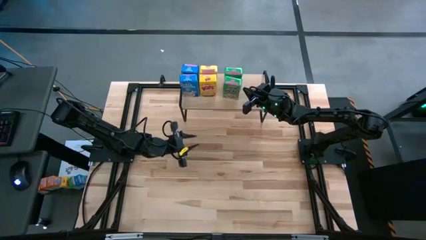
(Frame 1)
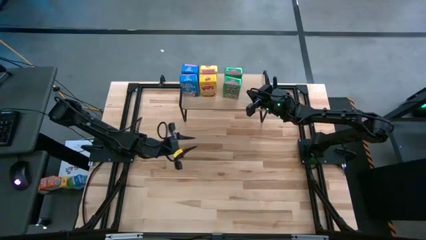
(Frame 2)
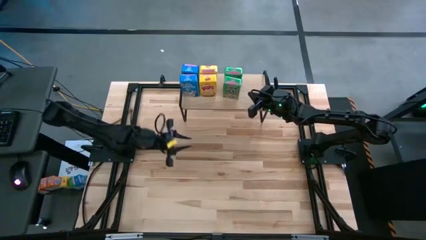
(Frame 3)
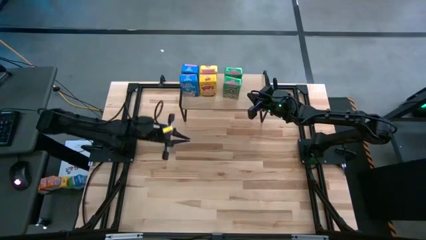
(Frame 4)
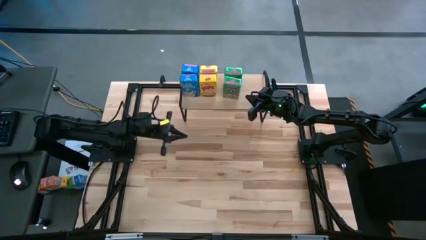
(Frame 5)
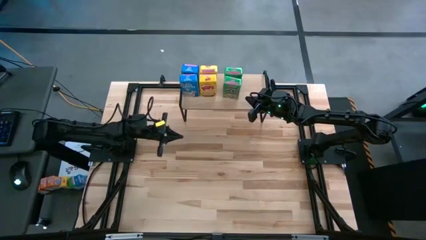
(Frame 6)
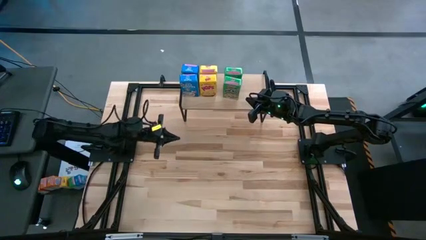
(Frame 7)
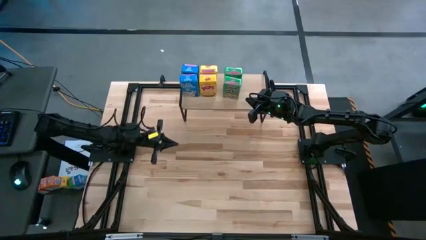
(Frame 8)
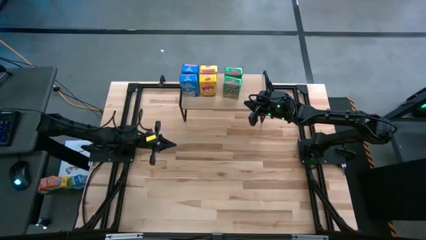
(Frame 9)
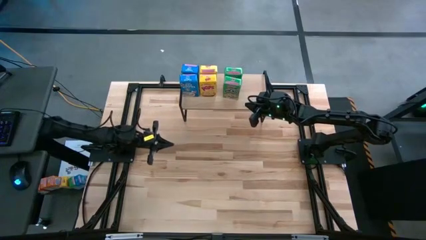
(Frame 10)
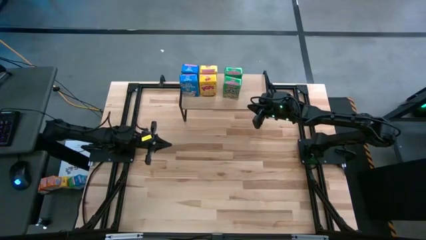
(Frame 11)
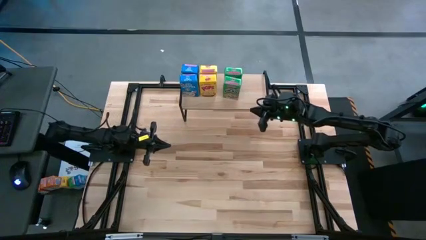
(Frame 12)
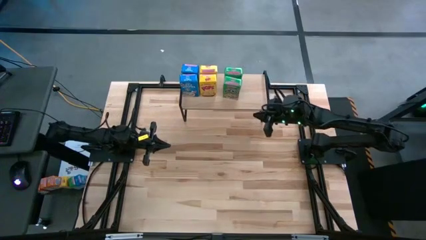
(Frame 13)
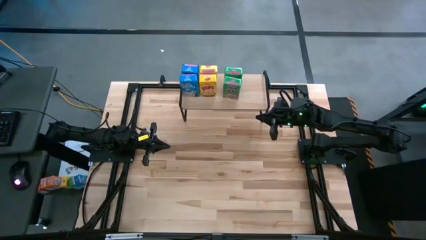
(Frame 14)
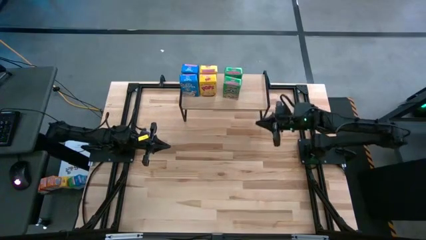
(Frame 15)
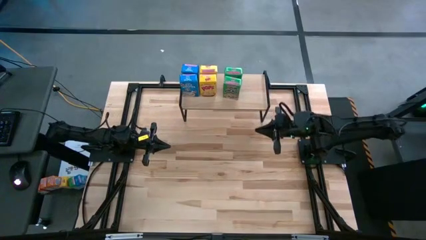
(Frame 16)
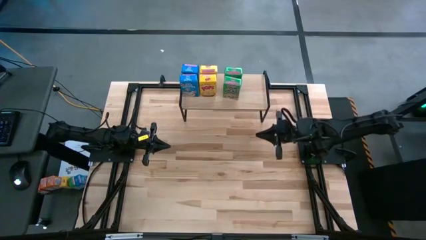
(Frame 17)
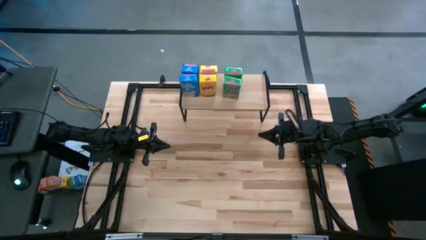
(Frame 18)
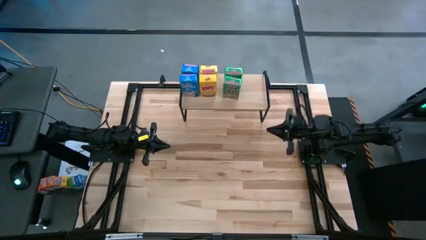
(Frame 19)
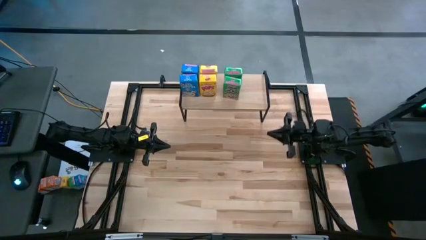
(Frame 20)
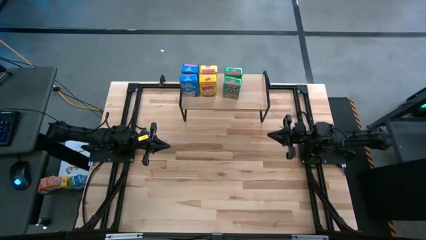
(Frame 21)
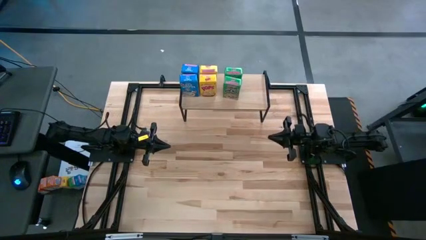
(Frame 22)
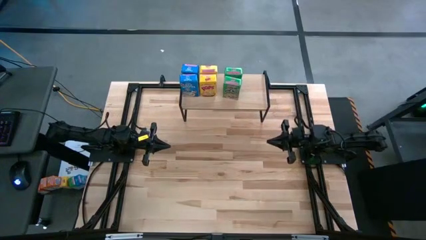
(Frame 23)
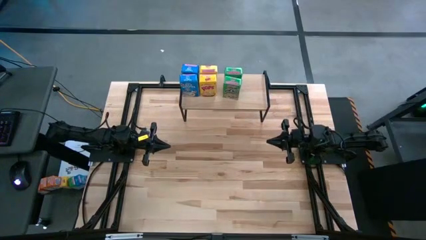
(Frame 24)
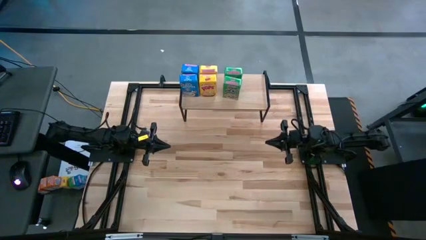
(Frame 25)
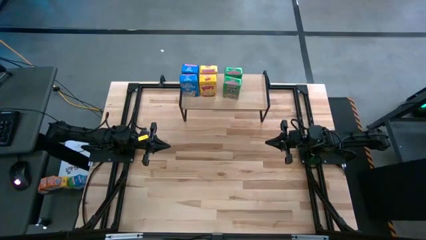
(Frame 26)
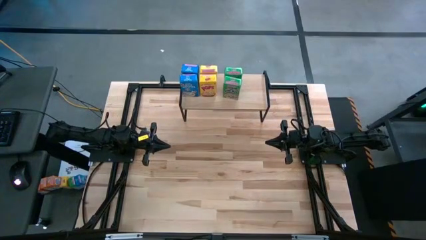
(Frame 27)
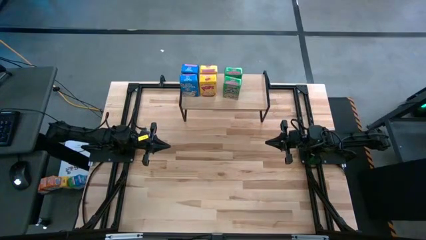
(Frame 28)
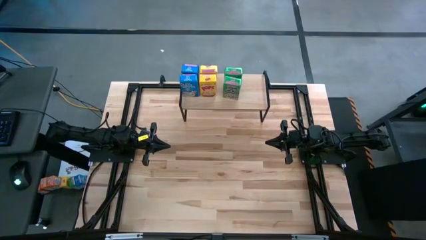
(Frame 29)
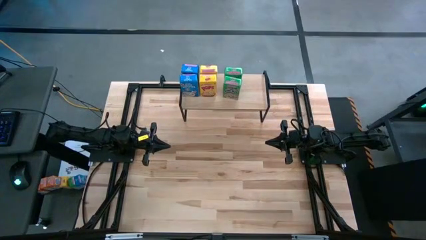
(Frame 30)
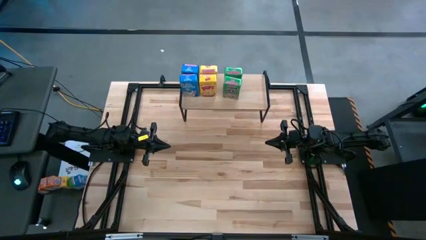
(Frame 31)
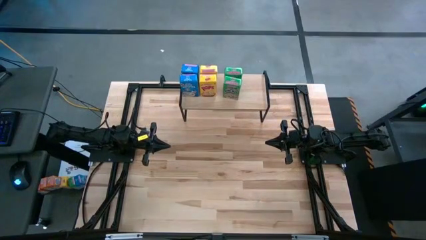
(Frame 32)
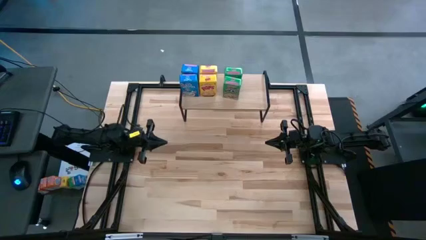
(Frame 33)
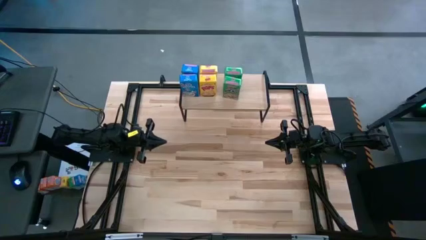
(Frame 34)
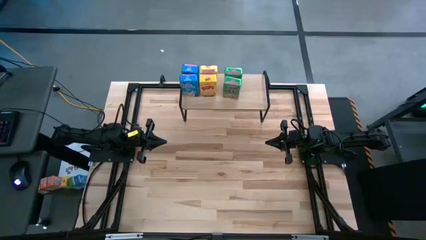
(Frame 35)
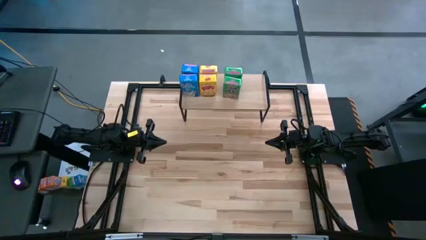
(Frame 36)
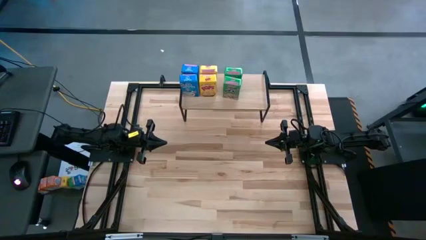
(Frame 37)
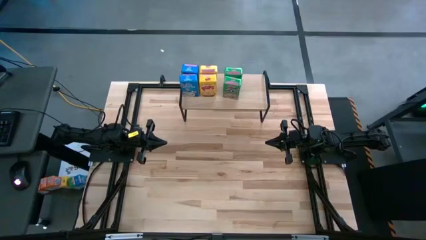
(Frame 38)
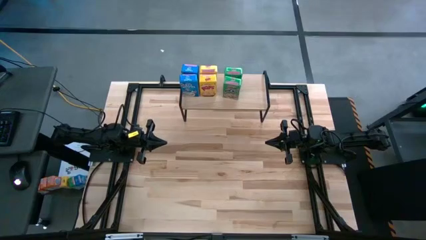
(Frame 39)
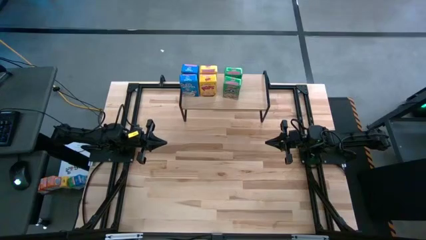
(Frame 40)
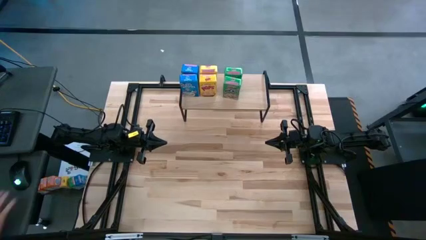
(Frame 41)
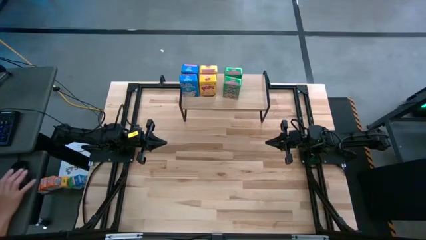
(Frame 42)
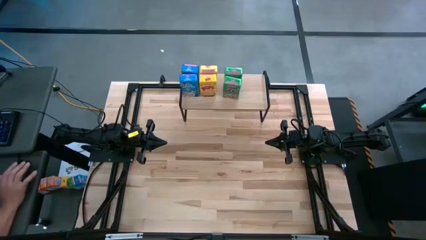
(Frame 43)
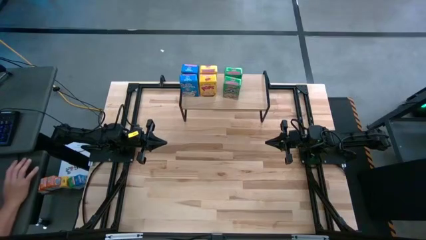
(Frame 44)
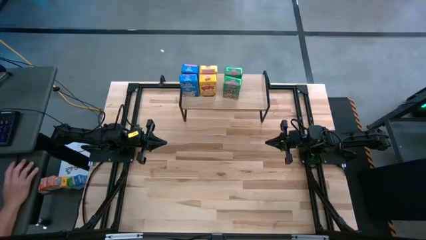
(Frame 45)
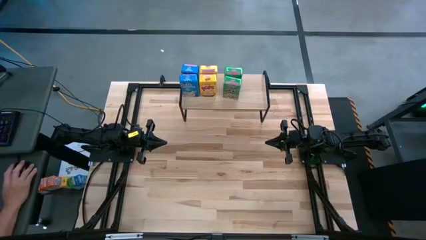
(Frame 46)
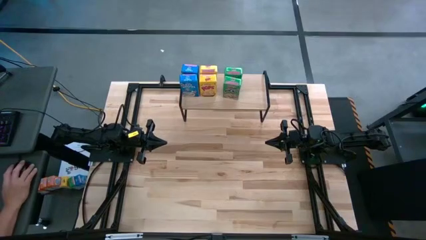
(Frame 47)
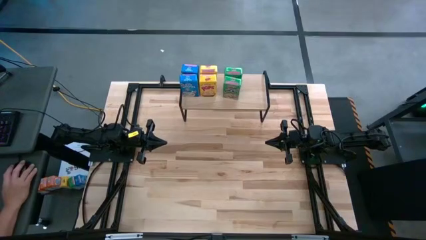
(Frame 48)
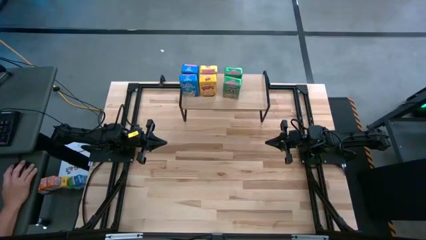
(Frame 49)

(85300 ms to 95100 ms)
Task: Stack cereal on shelf
Return to Home Position

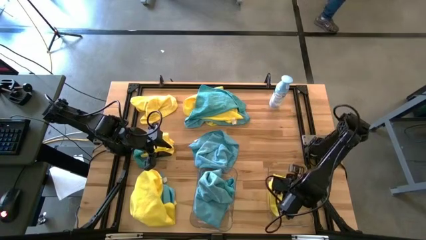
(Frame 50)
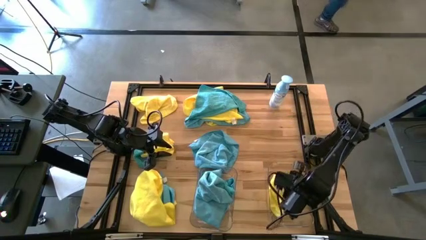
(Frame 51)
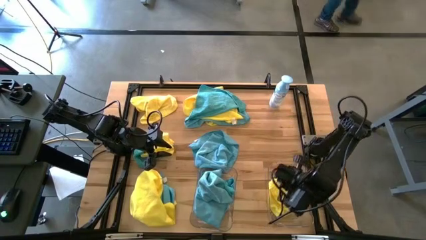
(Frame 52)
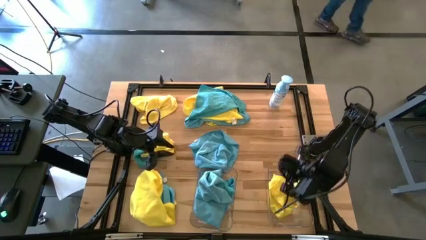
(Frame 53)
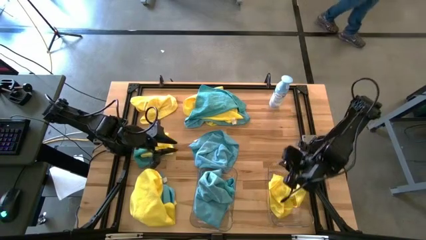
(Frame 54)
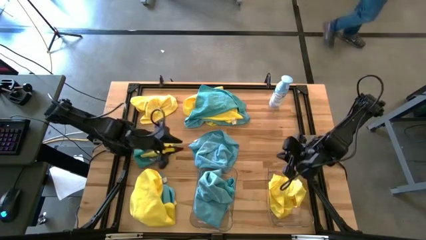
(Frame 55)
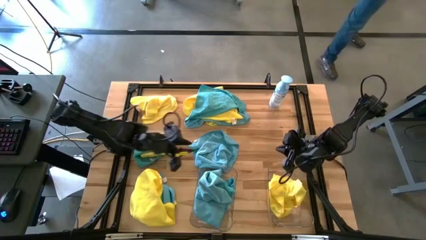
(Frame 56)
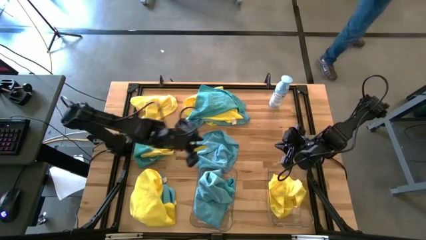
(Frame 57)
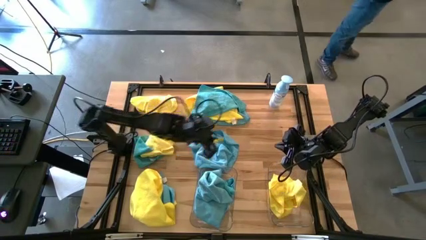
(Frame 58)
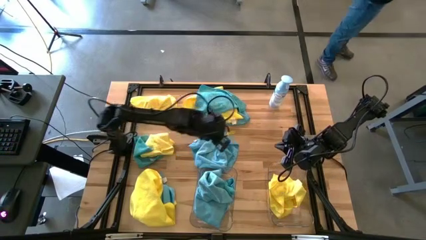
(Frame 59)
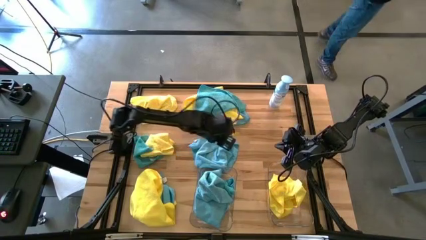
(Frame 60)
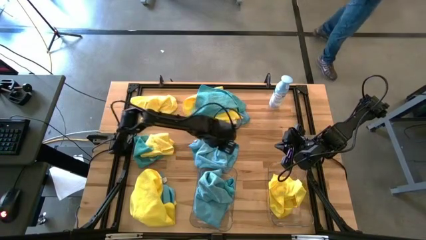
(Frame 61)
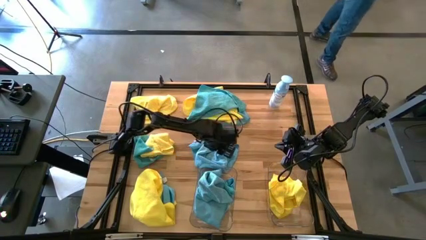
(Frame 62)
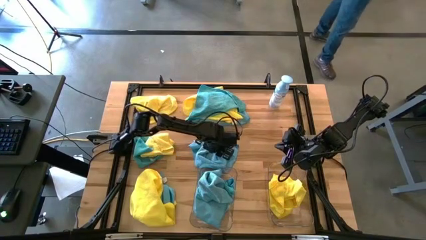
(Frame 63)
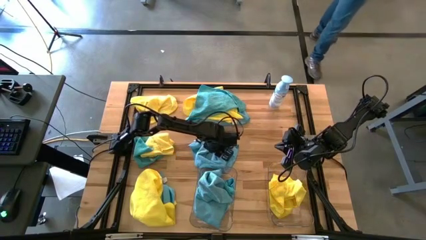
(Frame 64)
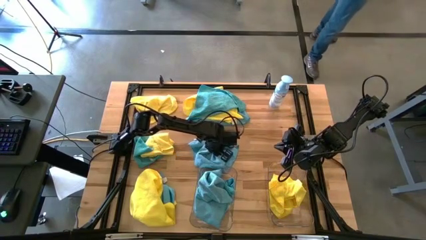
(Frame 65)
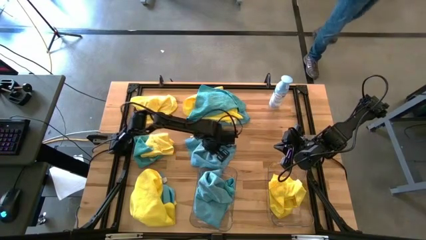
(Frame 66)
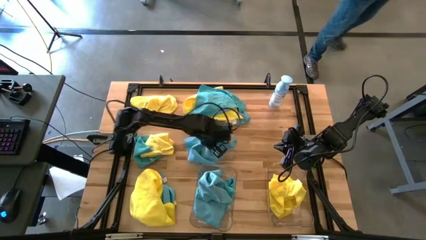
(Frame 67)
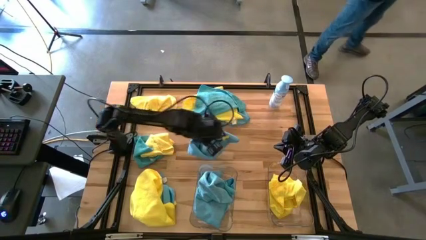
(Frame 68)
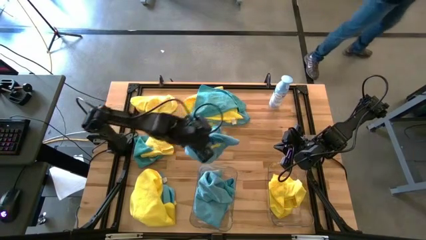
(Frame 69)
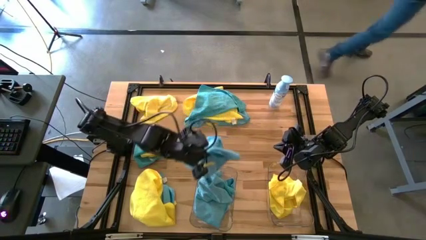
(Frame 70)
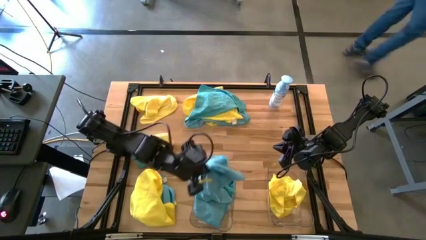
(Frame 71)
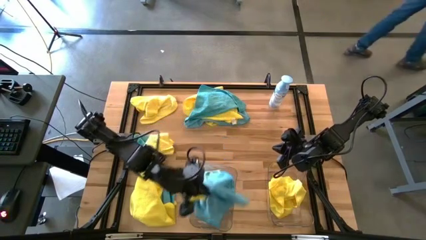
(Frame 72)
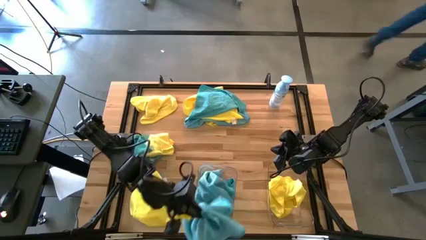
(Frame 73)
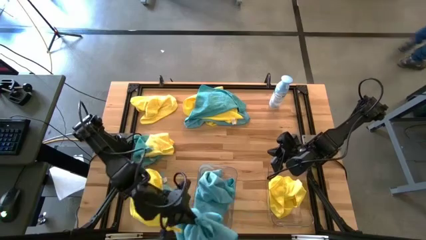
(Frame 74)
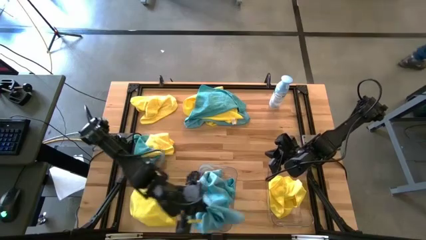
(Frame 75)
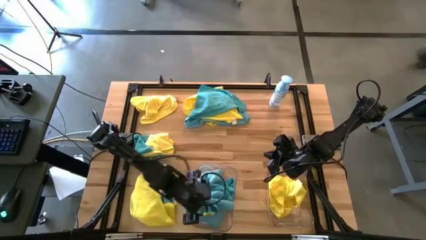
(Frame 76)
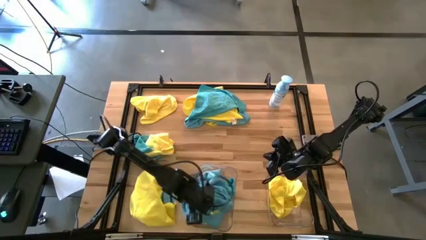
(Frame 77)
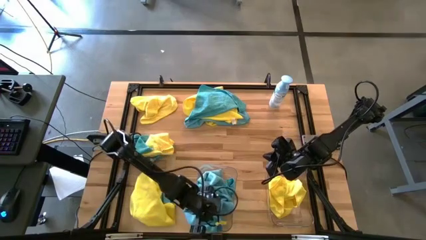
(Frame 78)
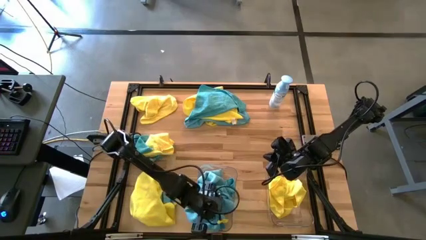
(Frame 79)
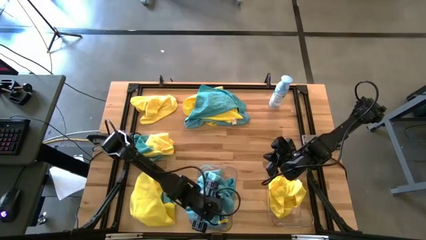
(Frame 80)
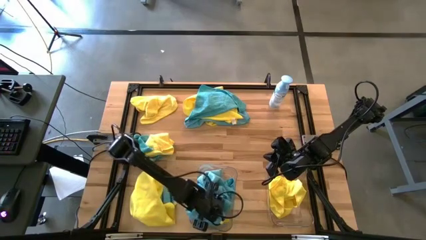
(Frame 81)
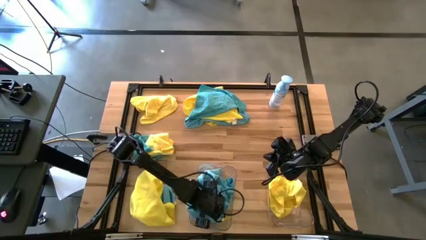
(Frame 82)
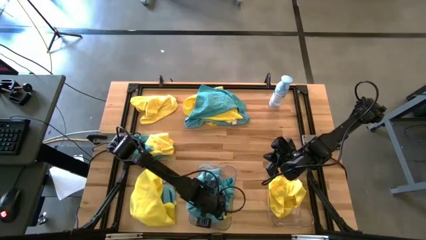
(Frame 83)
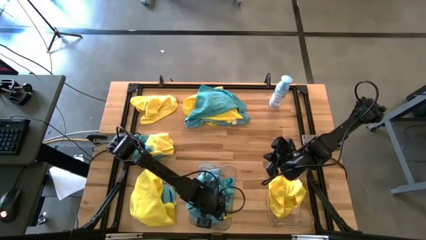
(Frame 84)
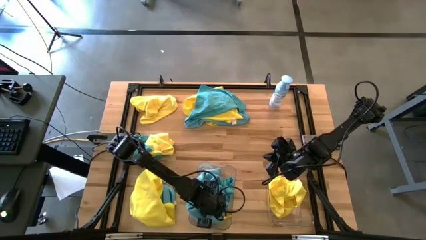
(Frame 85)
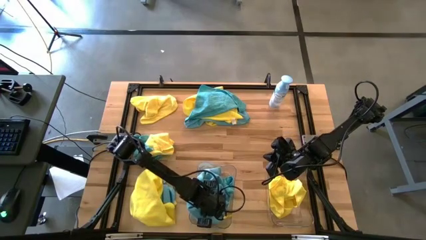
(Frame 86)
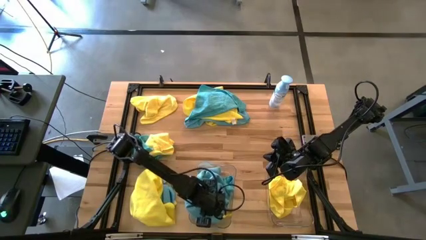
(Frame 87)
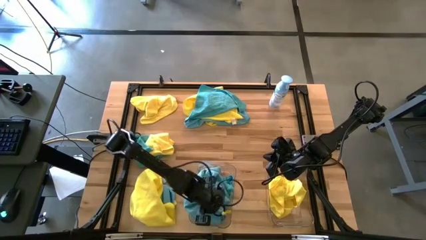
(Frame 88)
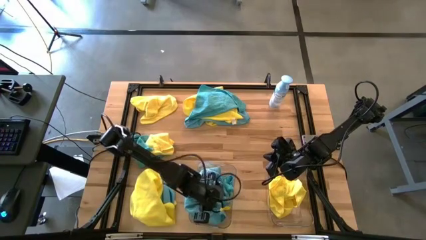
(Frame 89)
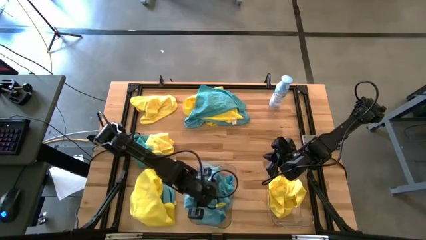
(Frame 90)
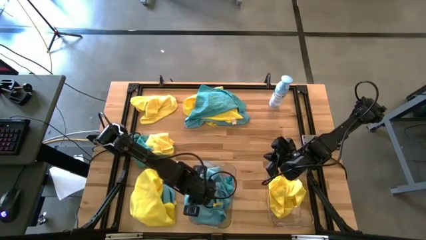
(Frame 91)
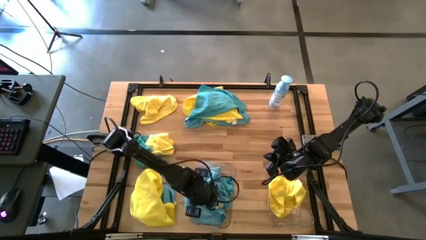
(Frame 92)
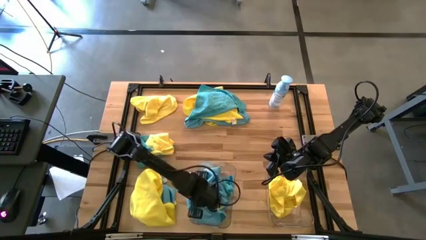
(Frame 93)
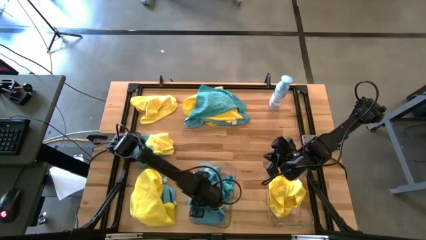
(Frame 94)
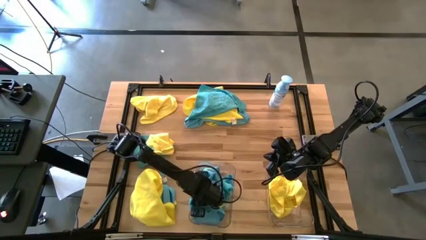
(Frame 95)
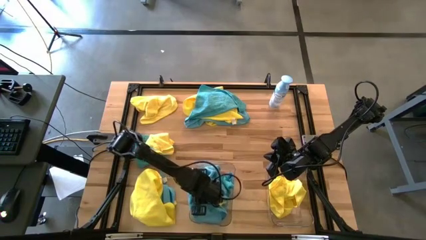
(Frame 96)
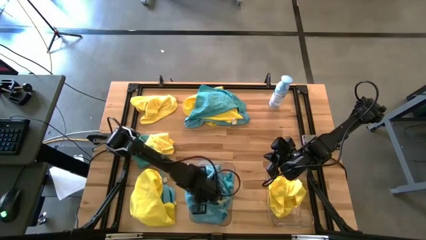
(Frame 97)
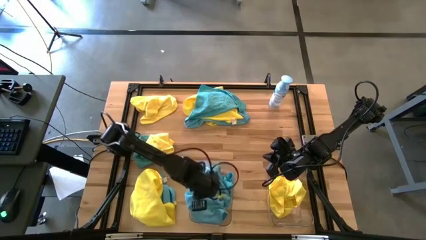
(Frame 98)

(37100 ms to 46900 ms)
Task: Sort microfiber towel by color & place in baskets
Put the blue towel into the left transparent bin
